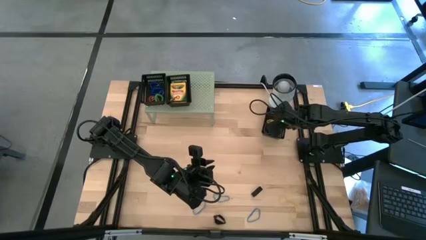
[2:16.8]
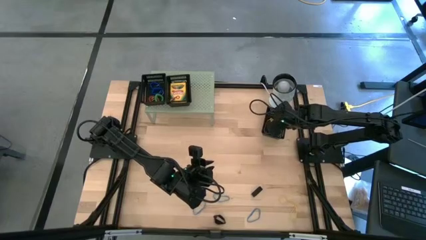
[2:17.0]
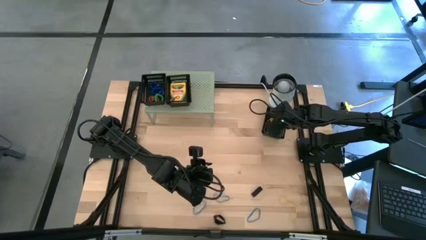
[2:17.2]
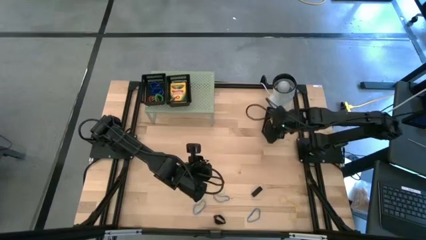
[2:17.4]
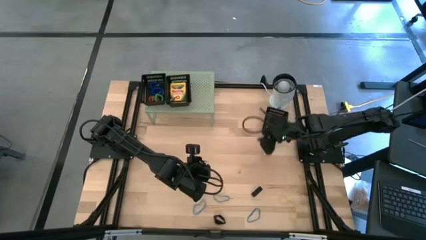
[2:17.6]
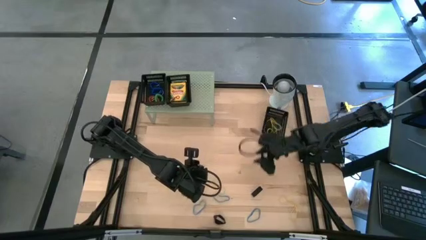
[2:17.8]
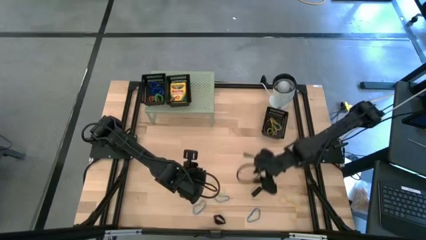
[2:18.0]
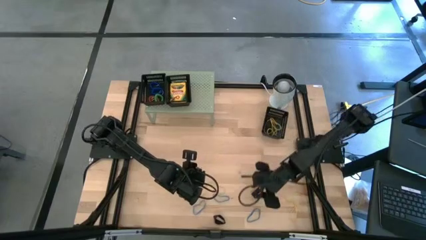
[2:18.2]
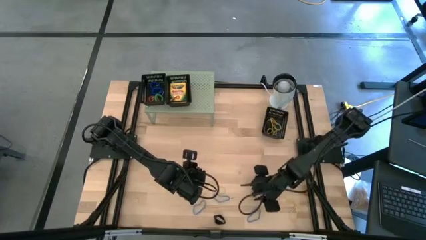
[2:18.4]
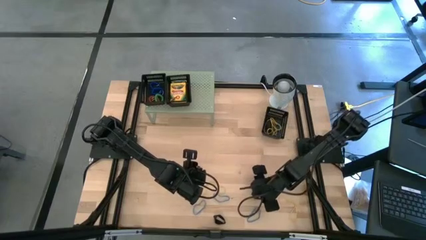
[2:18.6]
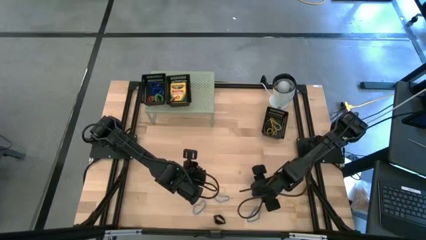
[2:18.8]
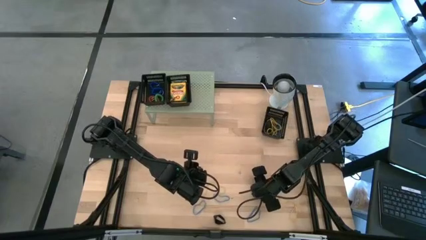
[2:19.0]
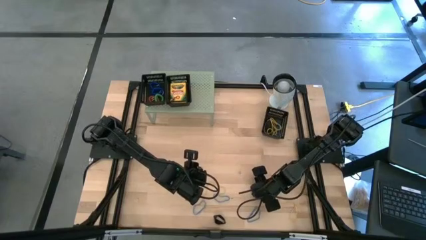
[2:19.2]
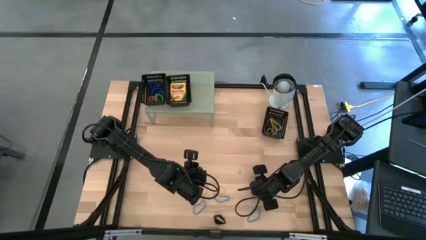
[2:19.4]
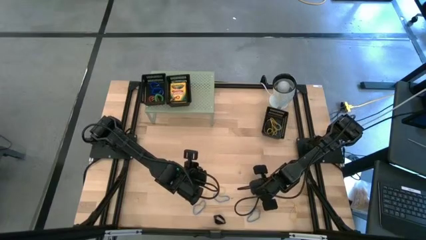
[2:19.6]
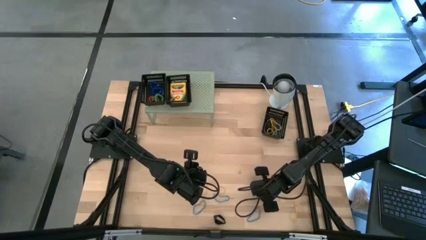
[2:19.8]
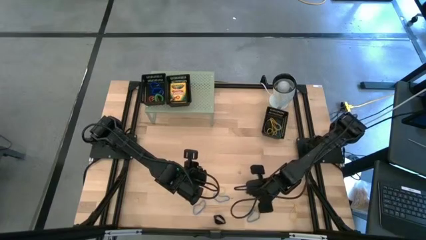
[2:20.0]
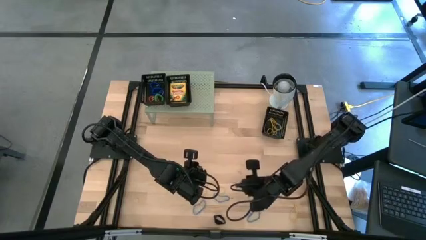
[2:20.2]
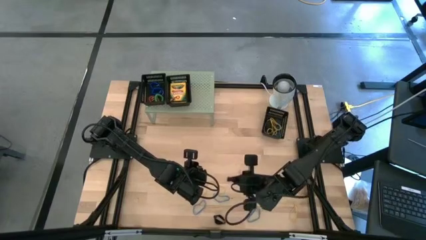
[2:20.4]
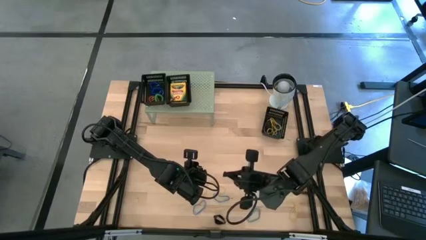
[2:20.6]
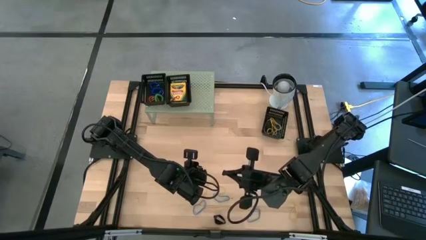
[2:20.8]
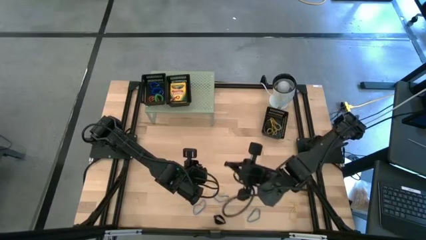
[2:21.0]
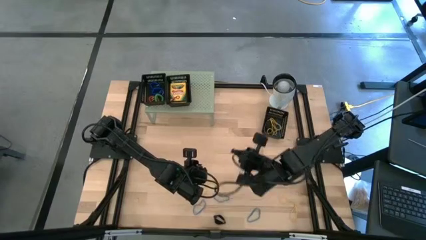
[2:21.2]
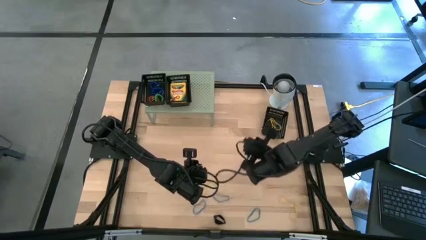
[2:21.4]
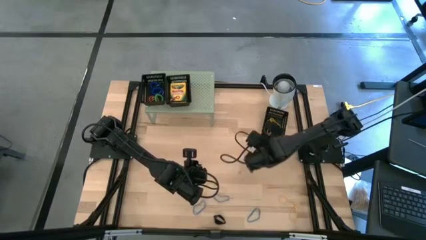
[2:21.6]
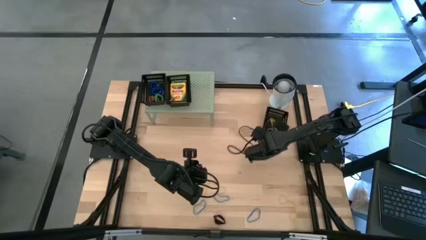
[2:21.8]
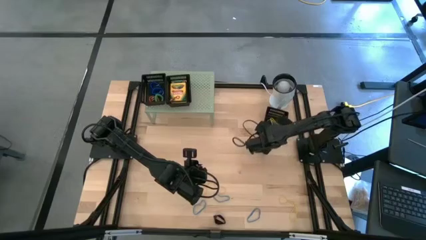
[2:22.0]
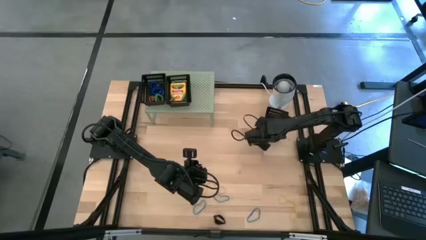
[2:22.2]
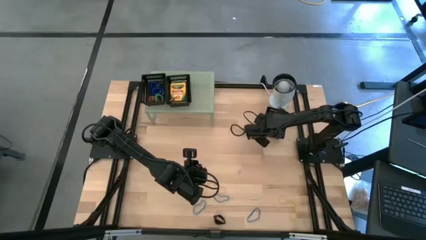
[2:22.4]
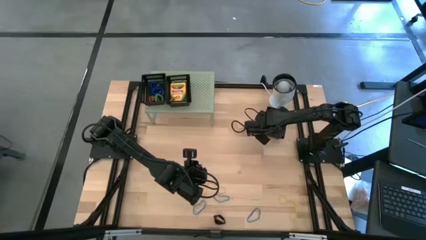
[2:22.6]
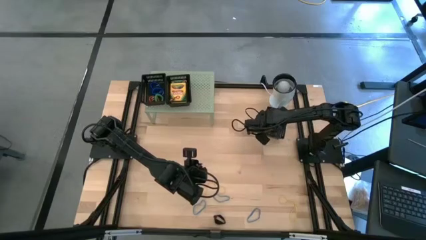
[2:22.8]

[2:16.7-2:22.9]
Task: Pick & Place Office Desk Supplies
Put the black rubber band into the black bin

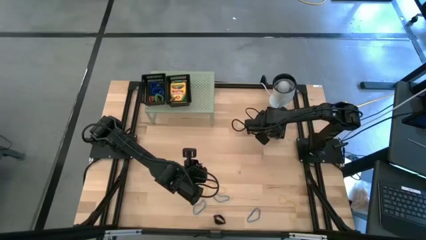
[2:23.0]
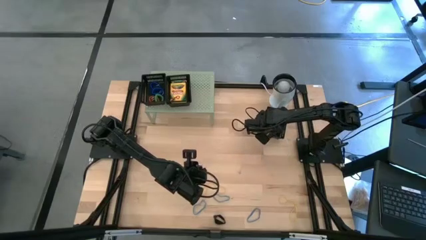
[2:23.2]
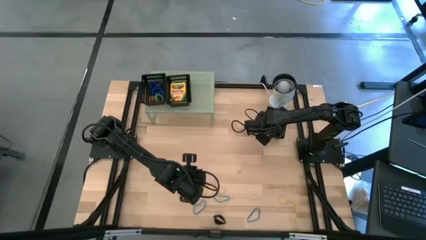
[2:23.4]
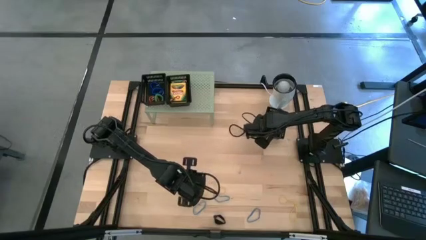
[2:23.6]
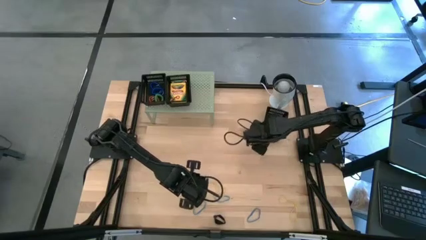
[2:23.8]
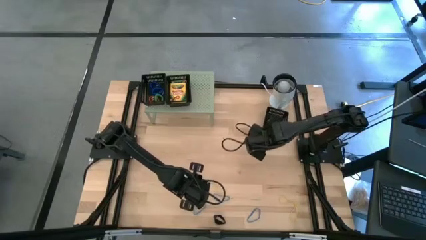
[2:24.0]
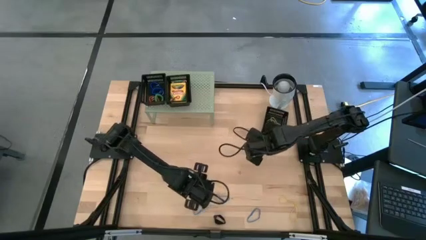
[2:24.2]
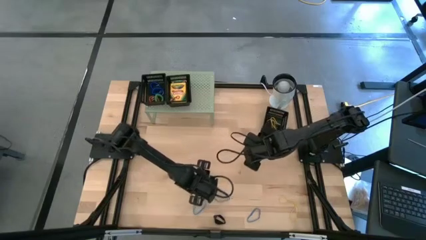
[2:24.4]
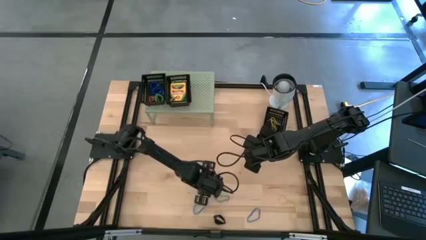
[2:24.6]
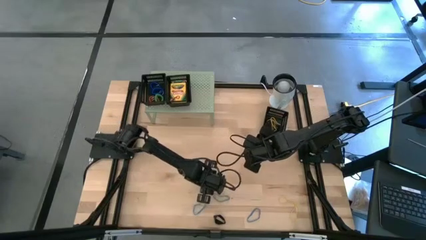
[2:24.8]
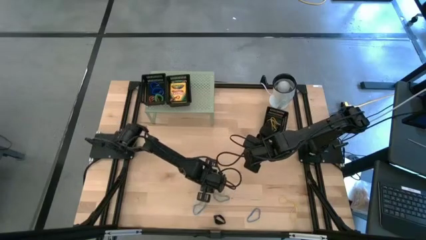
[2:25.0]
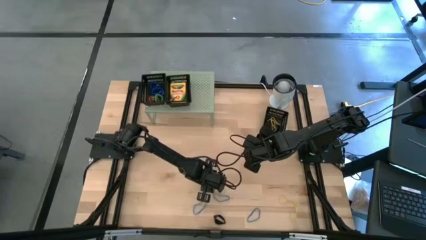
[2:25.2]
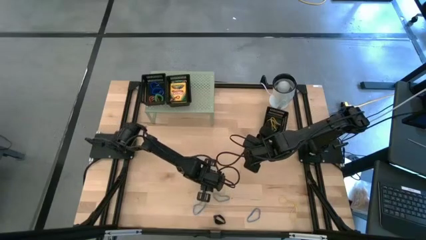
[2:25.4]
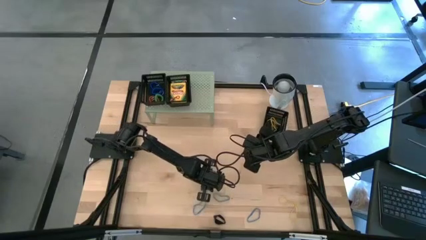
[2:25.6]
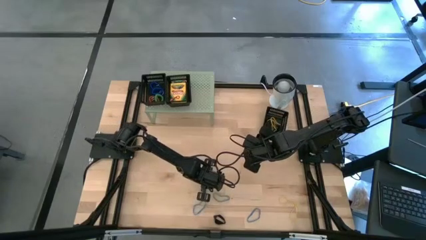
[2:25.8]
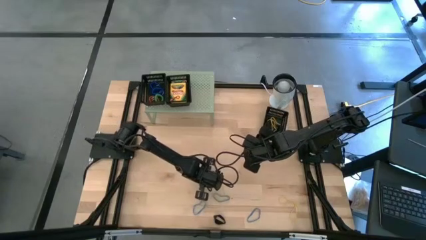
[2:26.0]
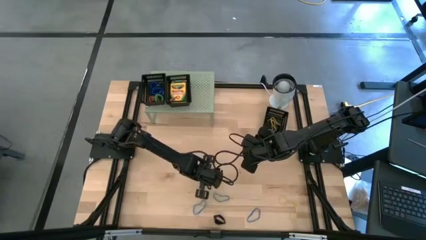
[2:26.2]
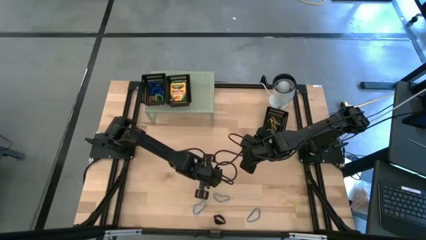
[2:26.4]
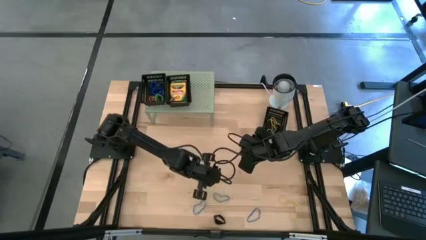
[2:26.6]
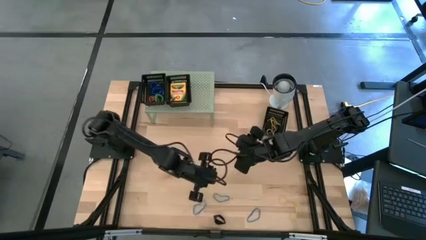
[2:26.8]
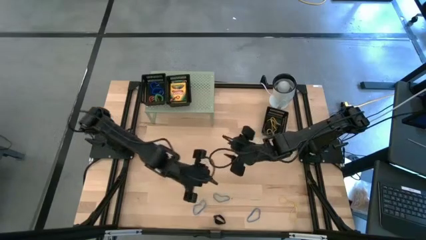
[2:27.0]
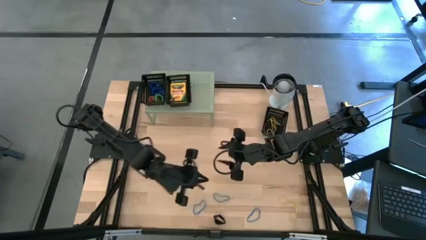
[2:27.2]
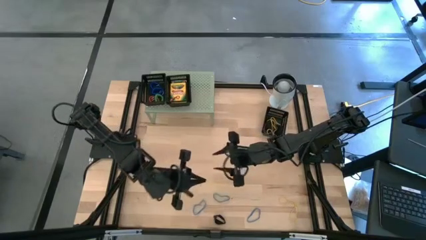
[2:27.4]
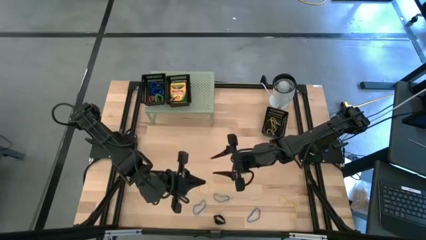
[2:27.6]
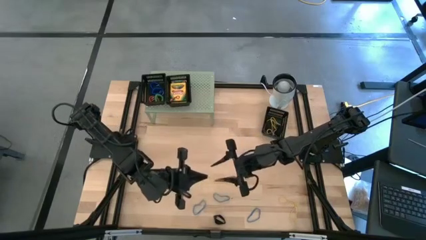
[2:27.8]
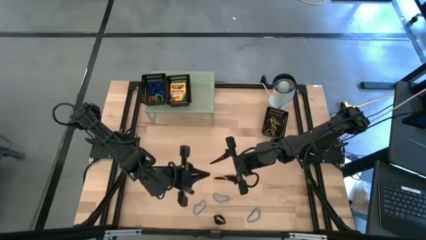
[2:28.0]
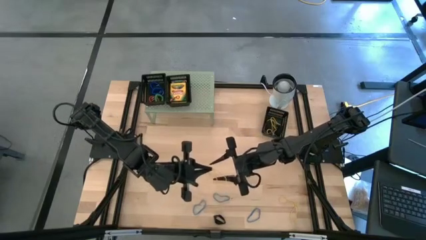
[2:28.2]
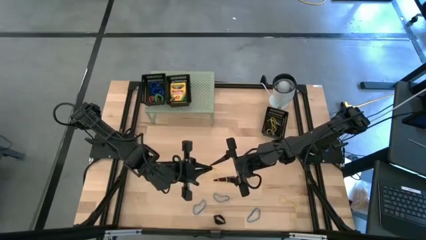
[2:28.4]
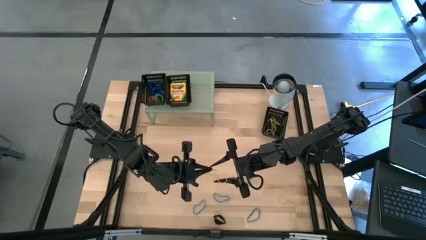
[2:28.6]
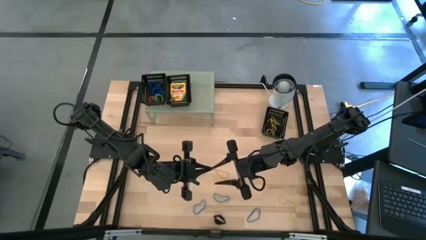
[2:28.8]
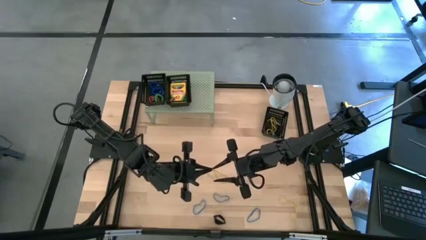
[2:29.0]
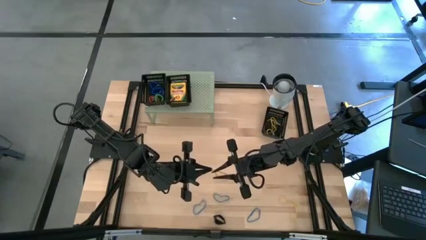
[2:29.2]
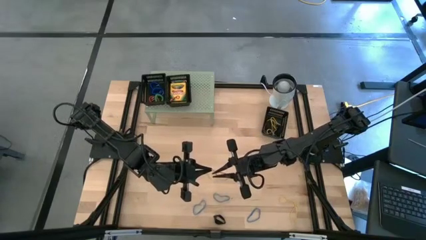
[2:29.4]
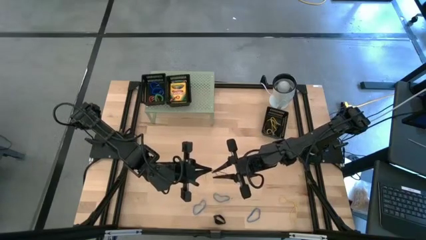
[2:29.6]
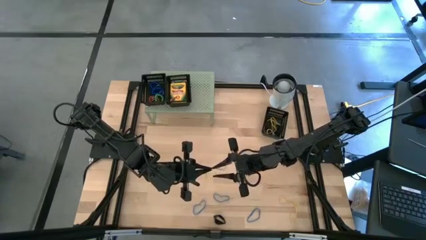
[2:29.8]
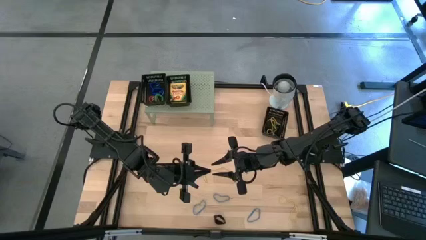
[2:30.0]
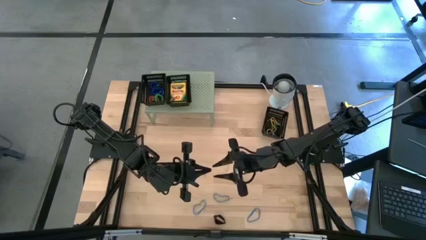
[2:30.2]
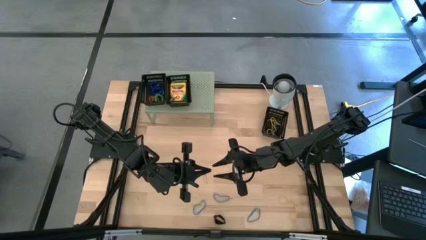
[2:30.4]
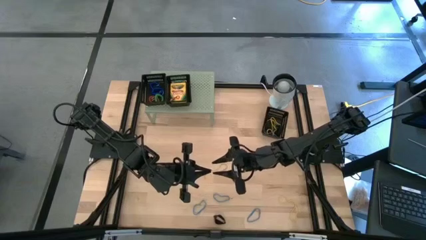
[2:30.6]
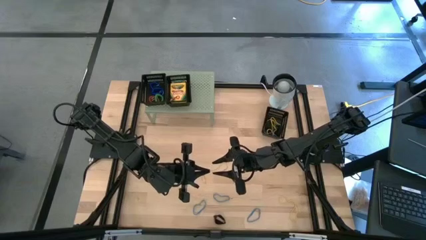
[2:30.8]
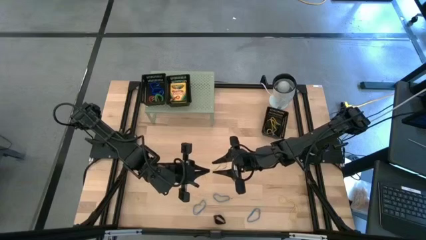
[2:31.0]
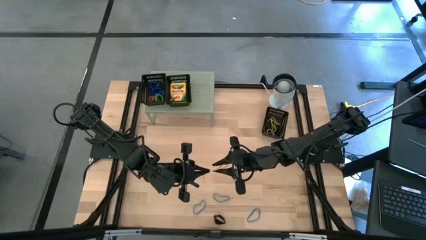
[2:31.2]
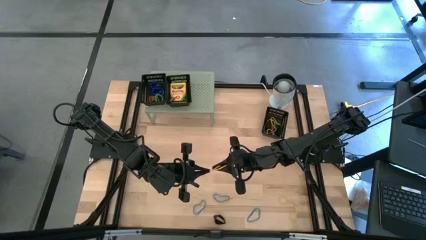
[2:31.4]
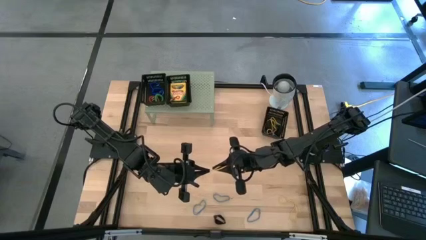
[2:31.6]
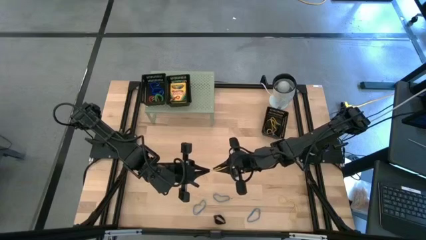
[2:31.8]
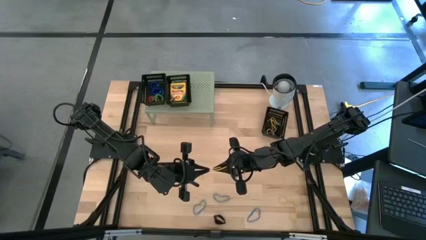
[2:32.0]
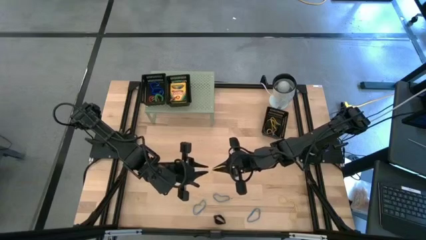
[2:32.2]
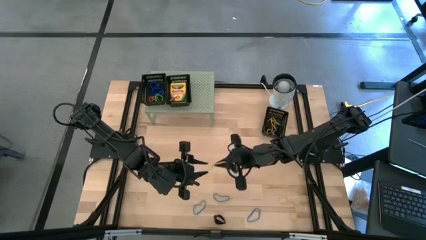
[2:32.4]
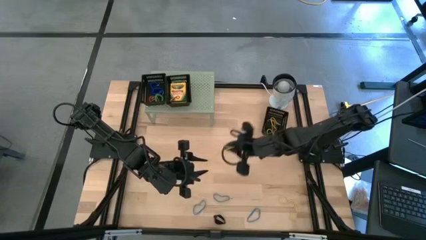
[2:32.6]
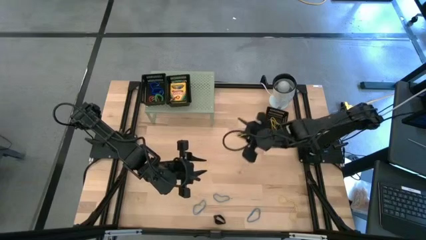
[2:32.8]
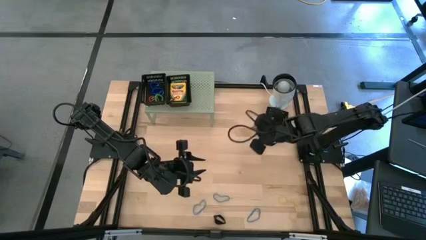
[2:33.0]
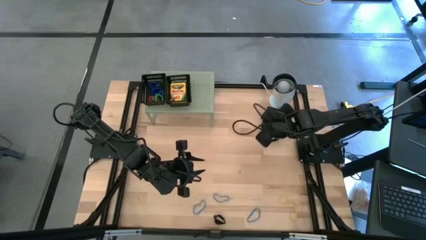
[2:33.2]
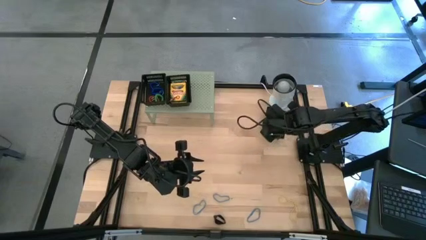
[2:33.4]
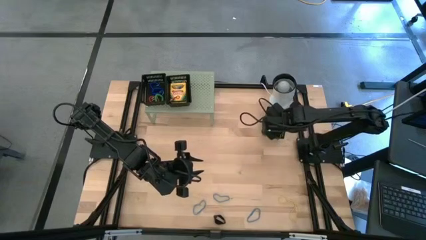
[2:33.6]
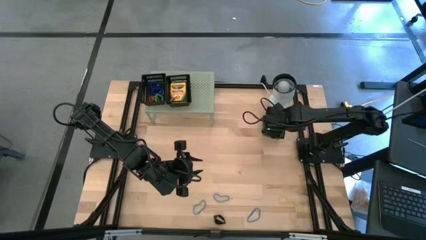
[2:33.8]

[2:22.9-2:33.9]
Put the yellow rubber band into the black bin
